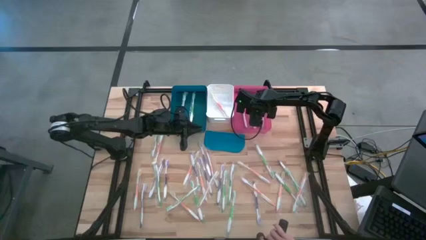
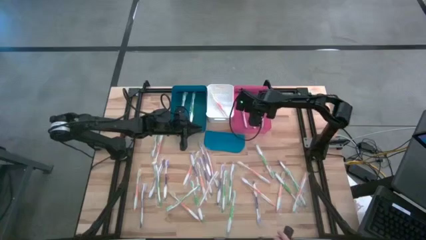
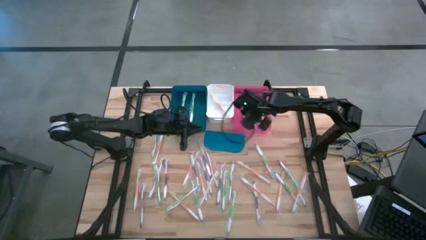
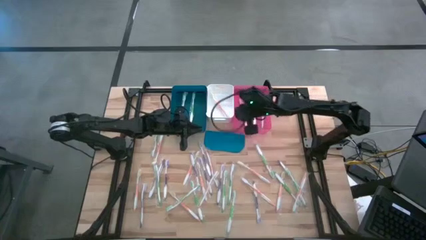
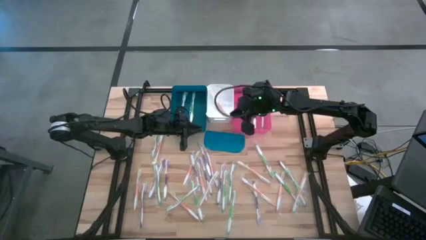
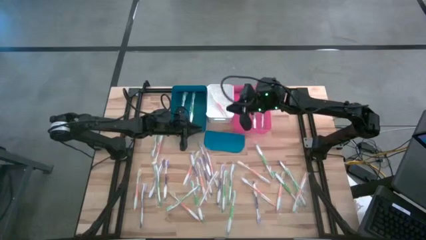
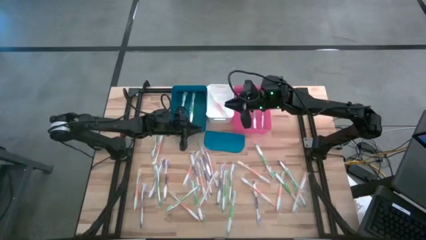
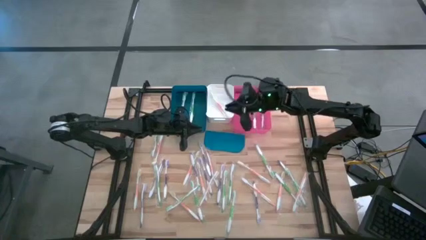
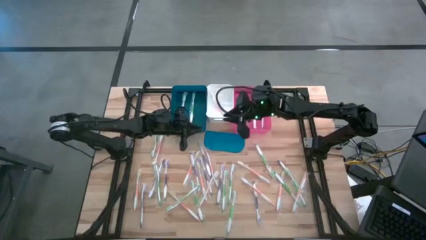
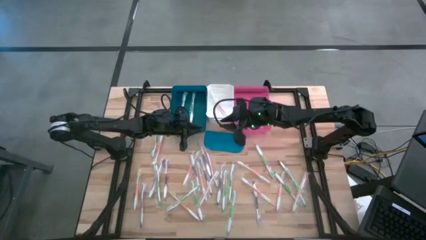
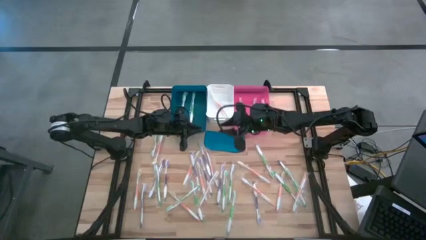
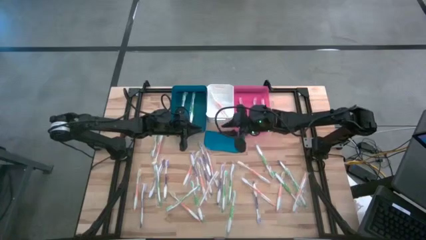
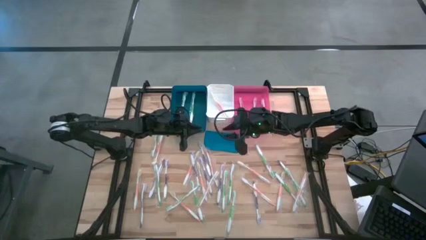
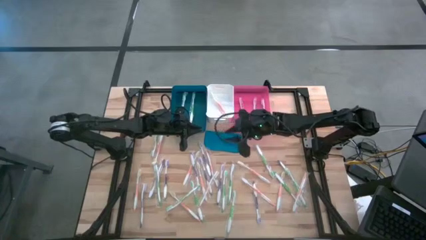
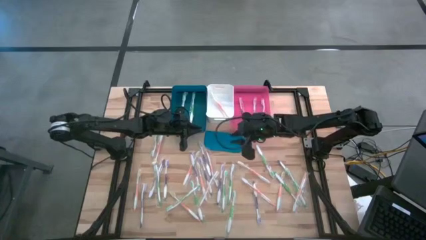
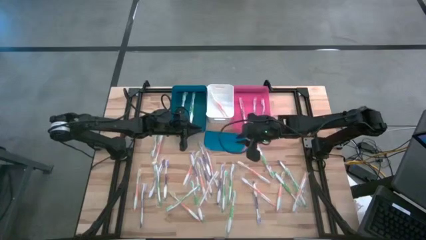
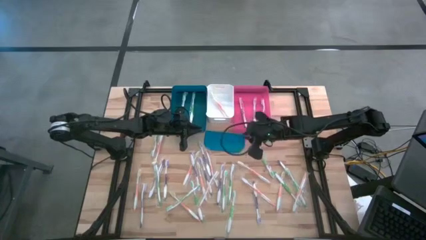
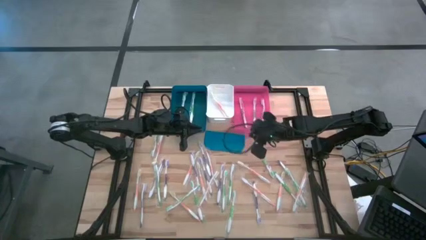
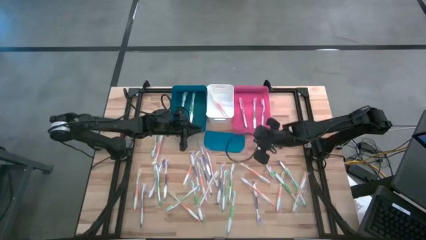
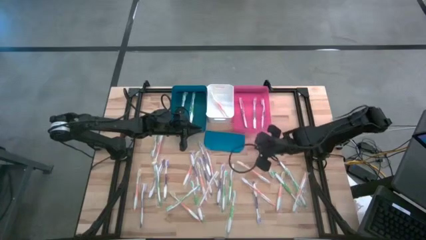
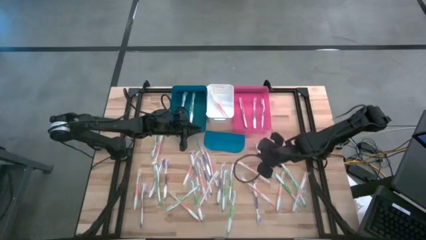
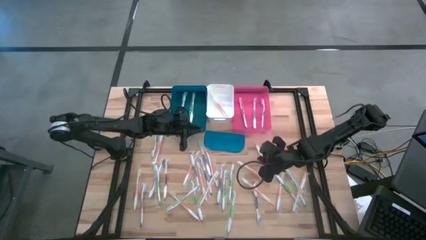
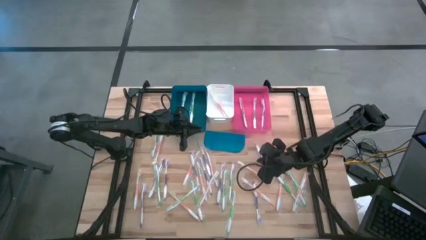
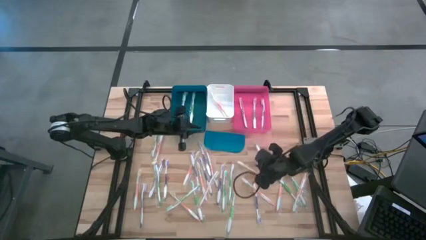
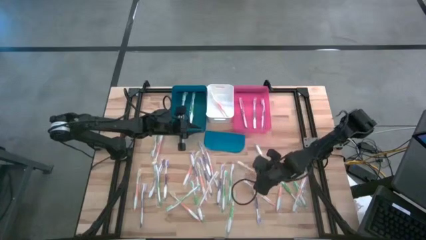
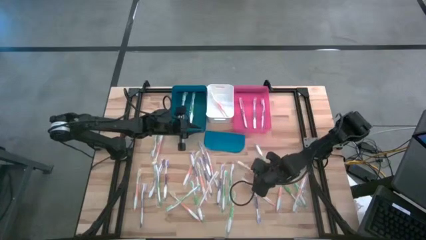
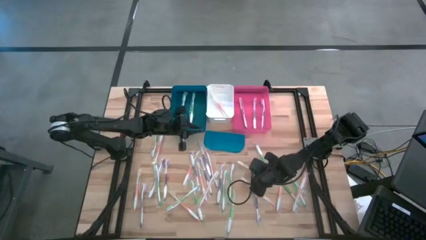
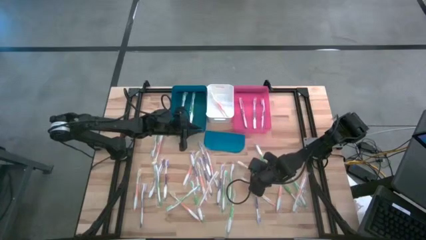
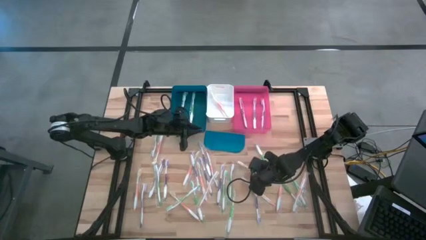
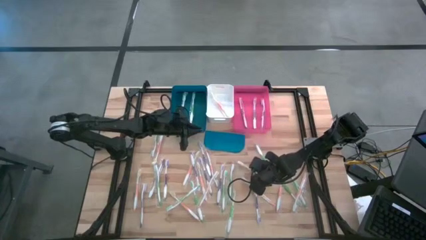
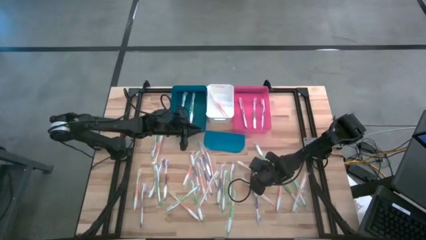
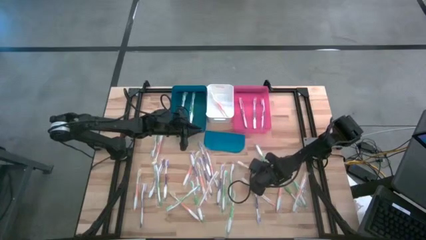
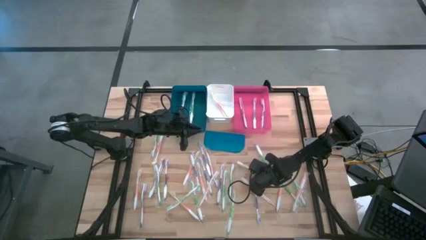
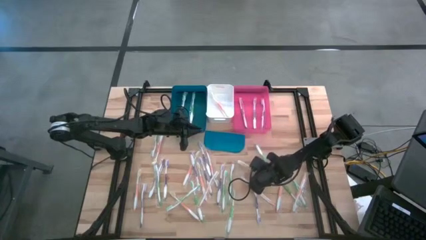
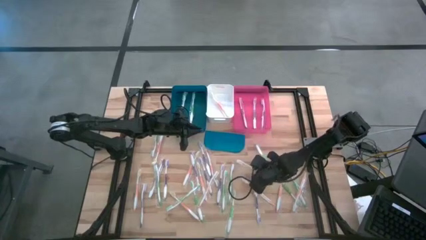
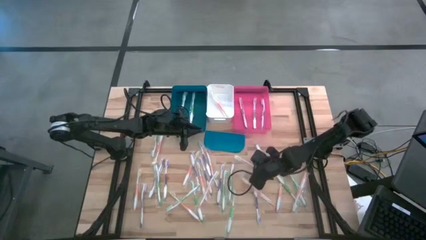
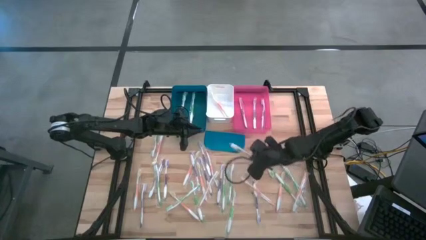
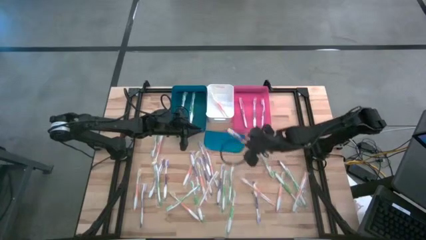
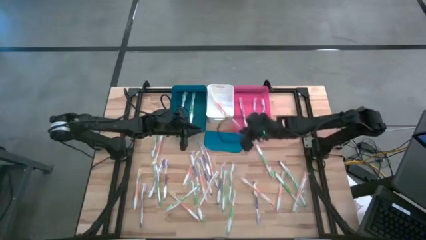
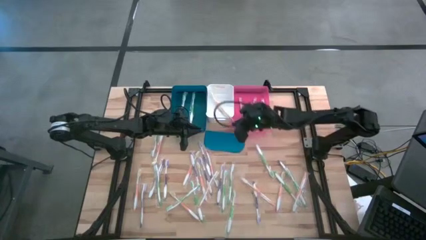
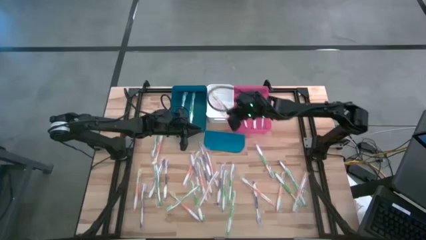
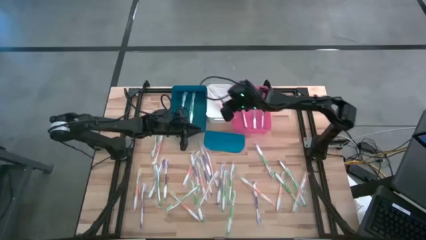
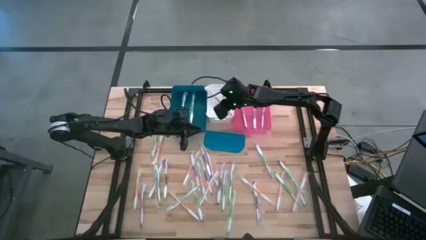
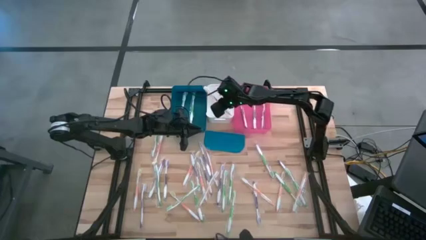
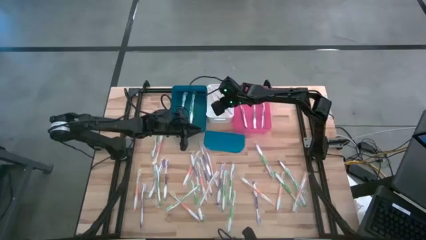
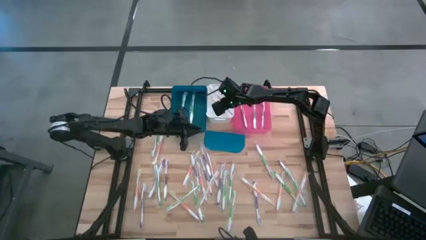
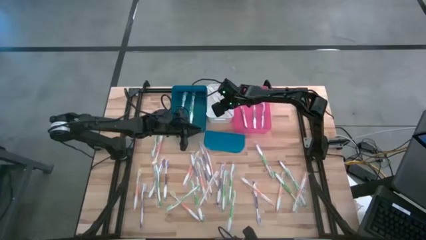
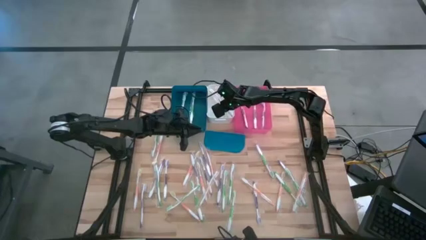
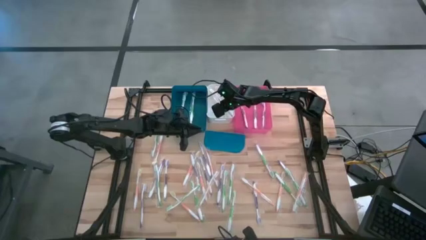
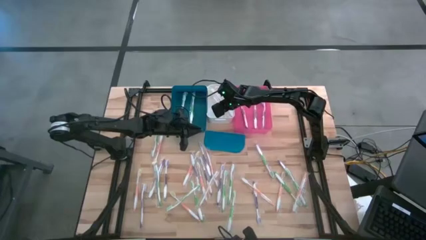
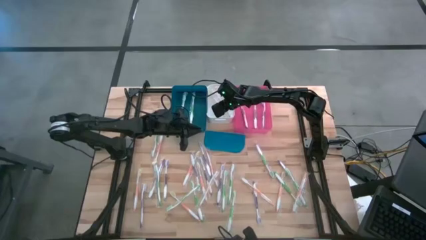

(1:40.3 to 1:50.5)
Task: Pick & Place Toothbrushes
Put the orange toothbrush into the white bin

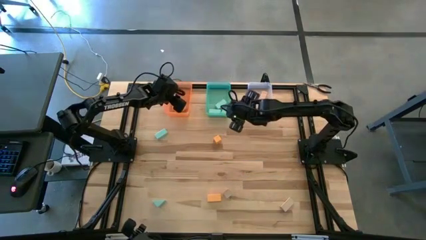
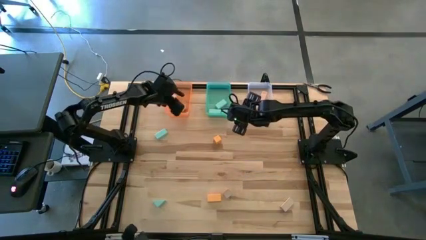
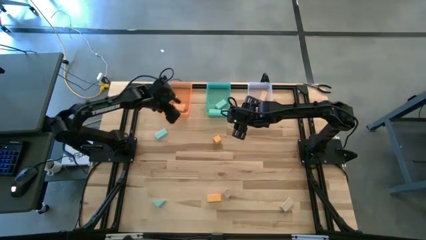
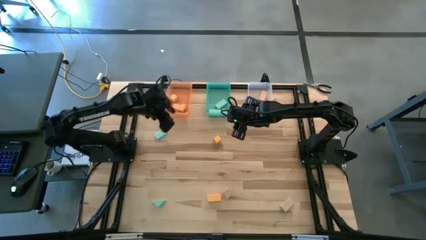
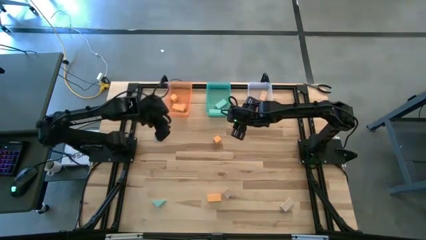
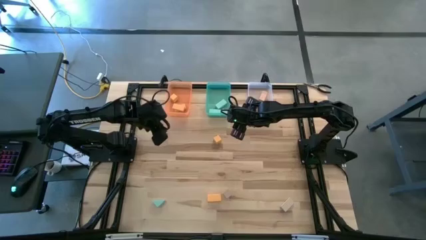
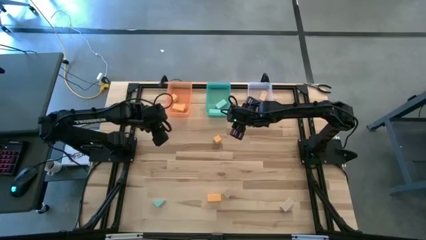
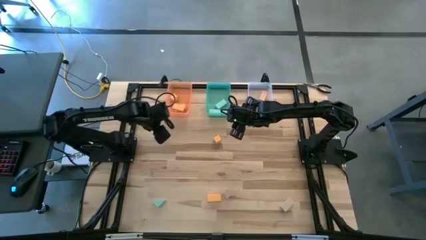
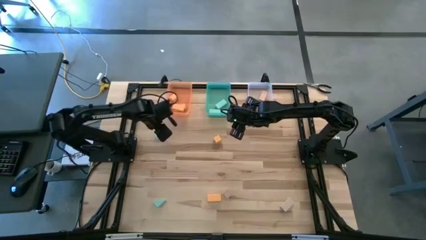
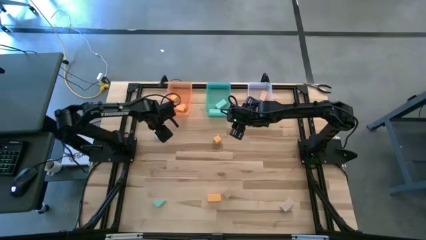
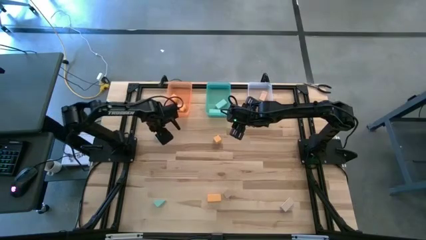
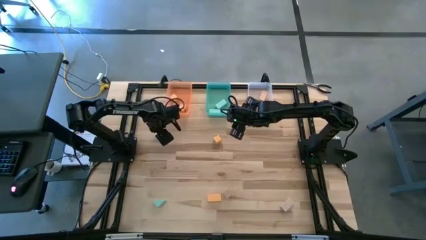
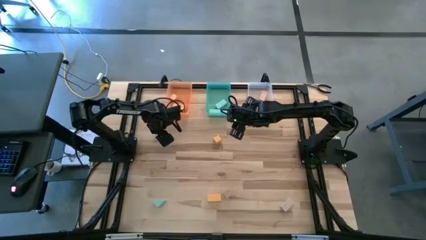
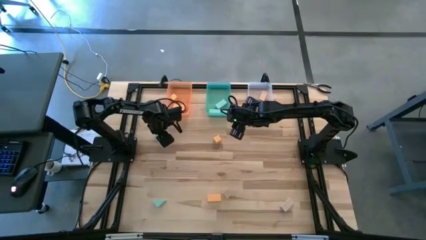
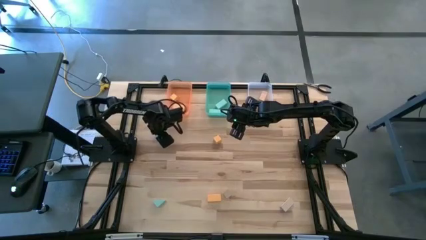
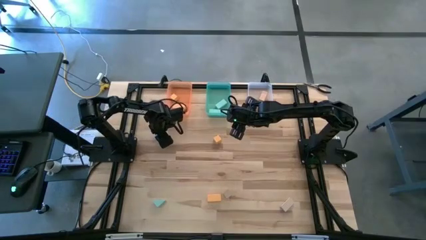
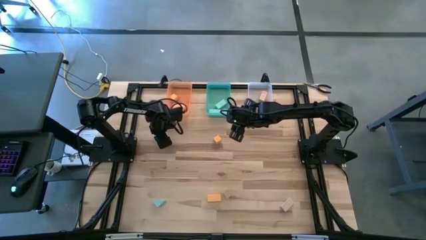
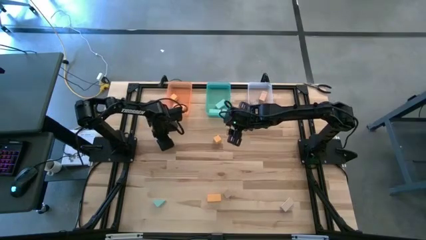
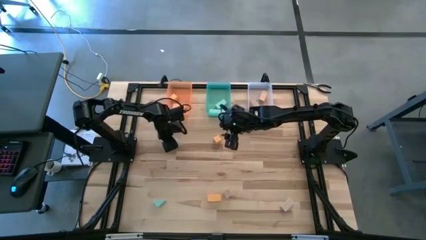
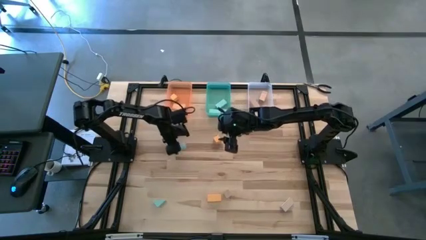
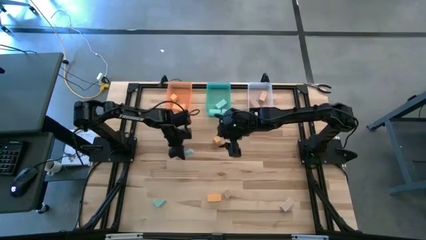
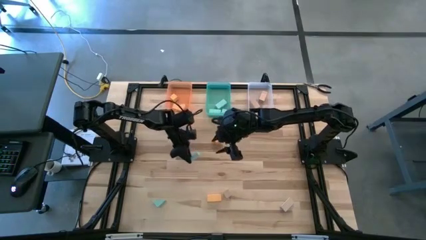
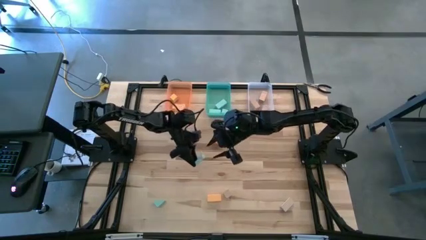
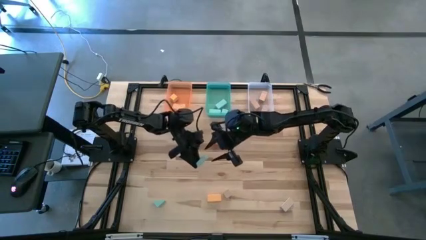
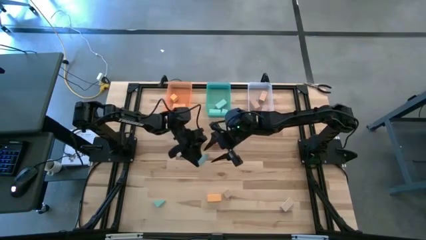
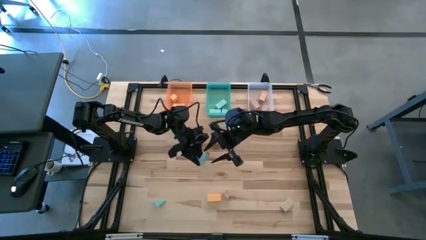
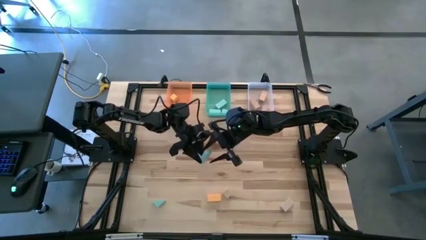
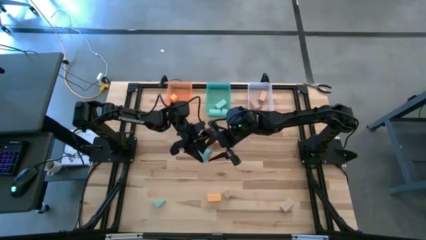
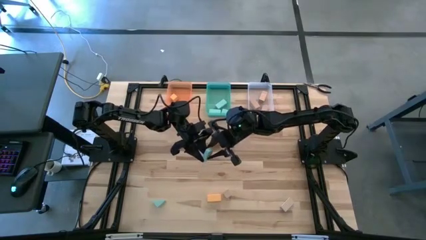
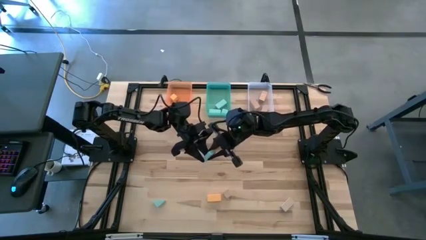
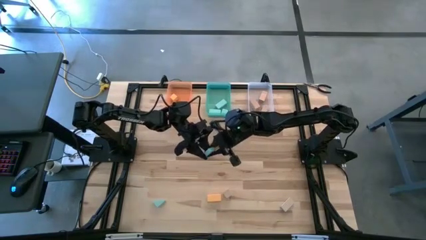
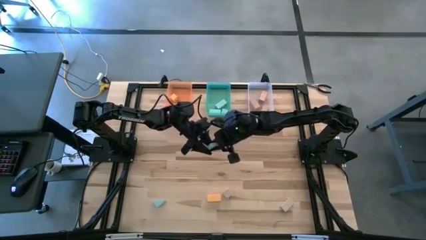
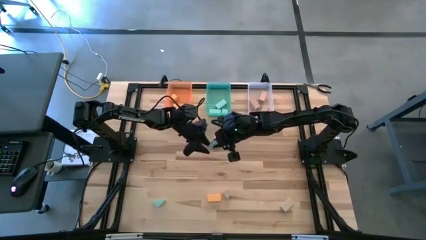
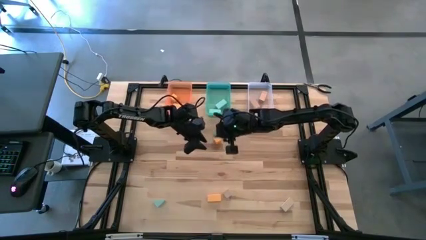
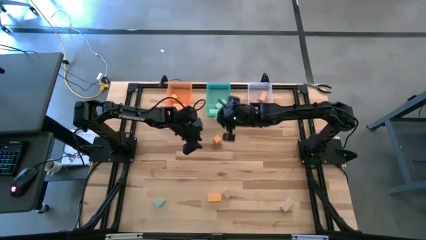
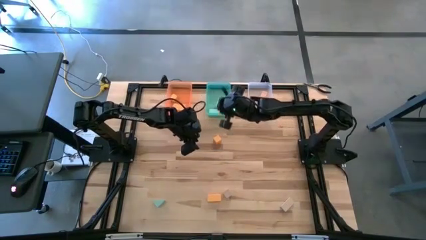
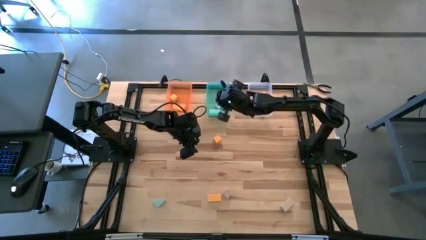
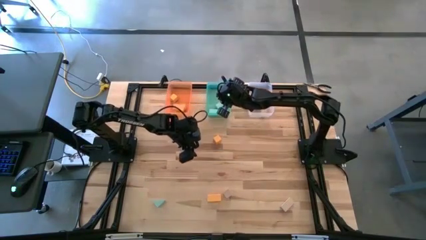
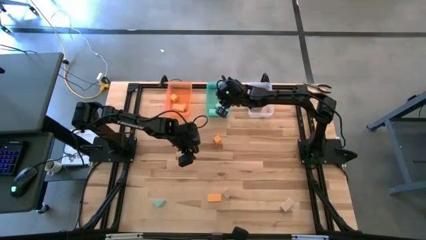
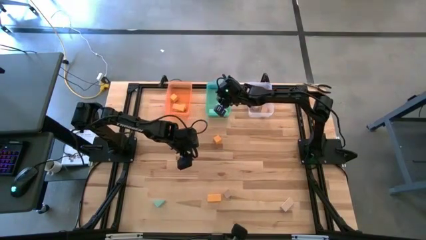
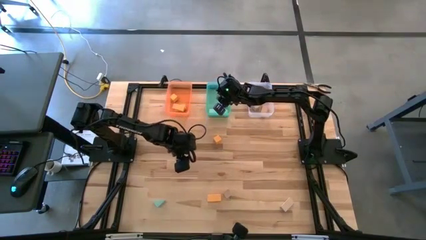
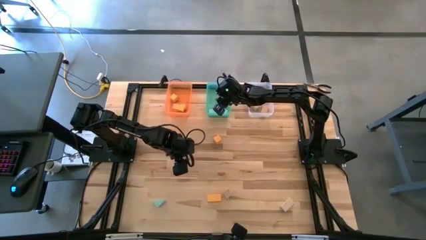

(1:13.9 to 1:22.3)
Task: Sort & place blocks by color
Put the blue block into the blue bin
